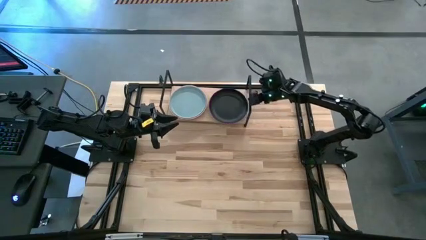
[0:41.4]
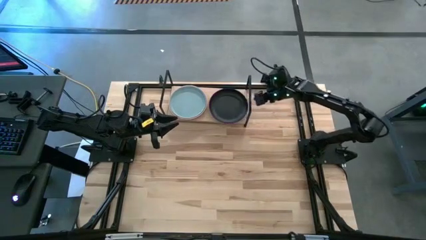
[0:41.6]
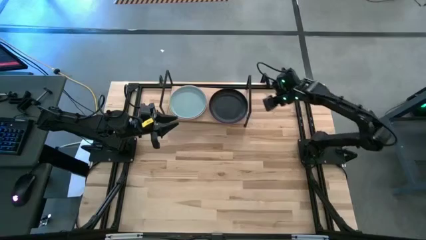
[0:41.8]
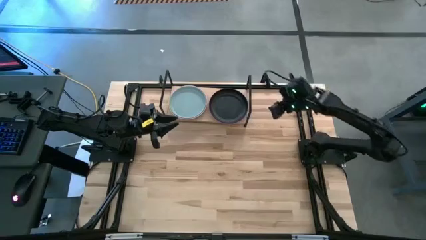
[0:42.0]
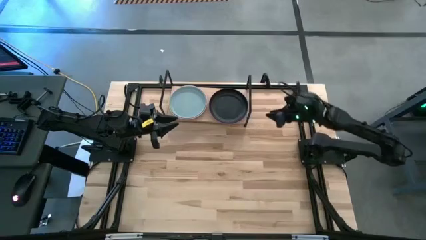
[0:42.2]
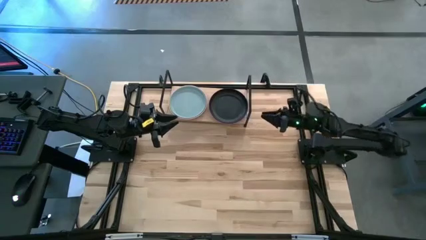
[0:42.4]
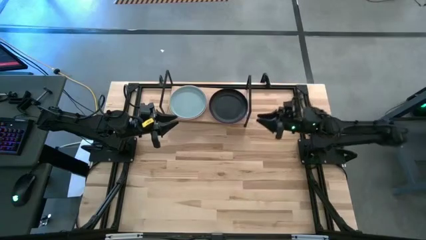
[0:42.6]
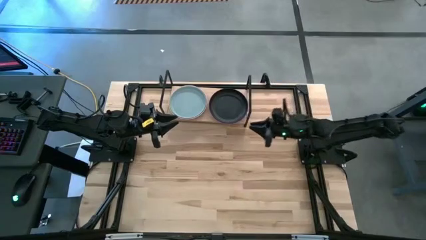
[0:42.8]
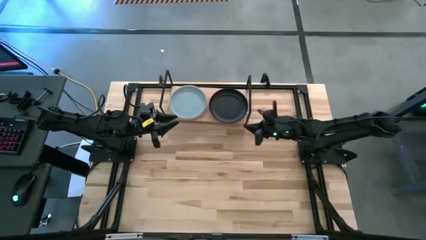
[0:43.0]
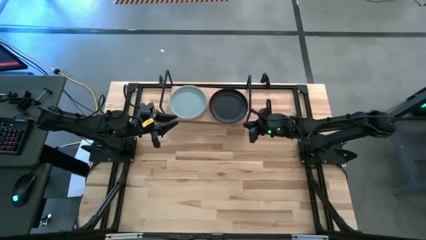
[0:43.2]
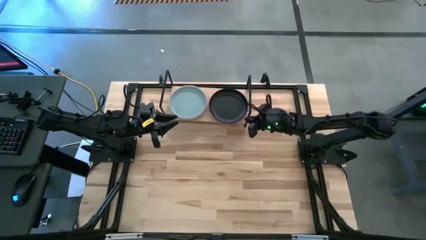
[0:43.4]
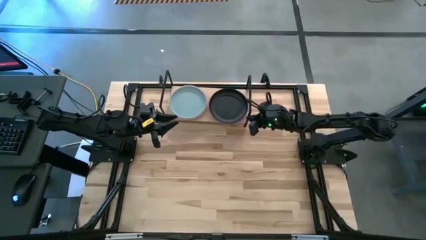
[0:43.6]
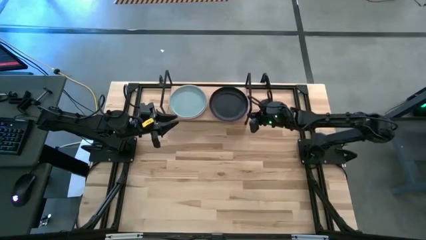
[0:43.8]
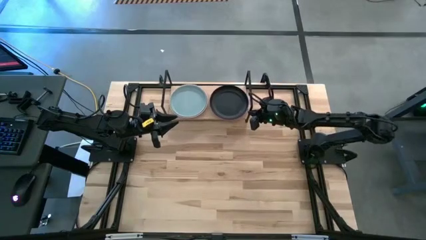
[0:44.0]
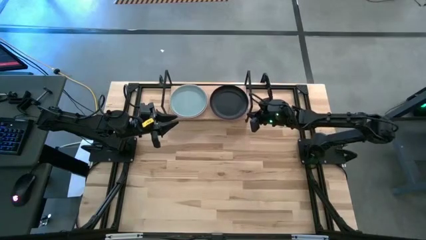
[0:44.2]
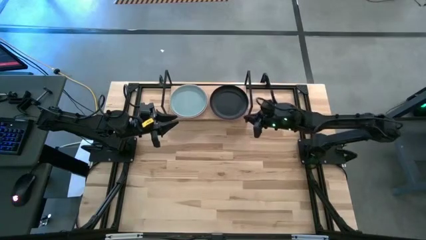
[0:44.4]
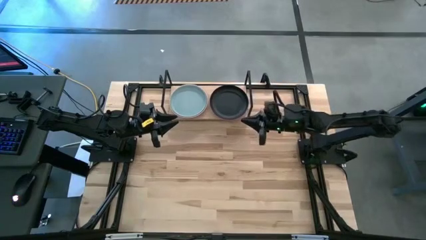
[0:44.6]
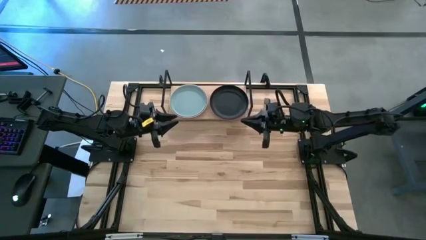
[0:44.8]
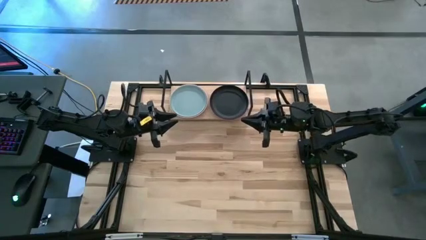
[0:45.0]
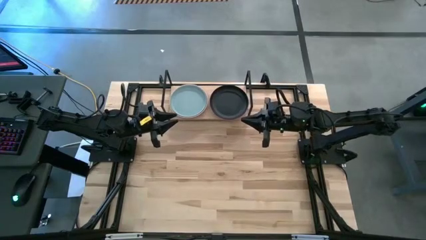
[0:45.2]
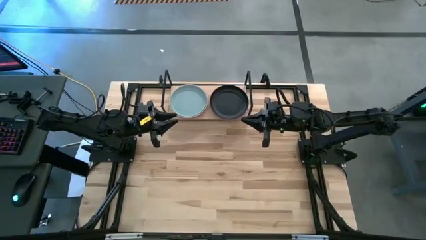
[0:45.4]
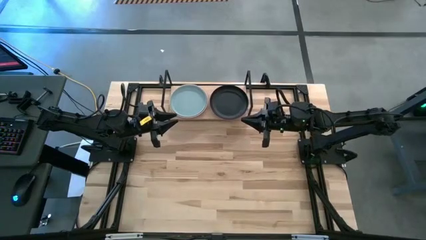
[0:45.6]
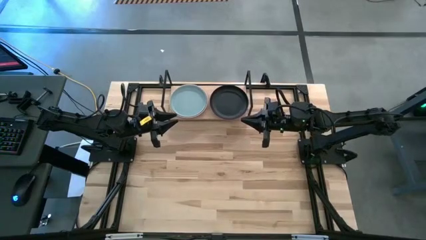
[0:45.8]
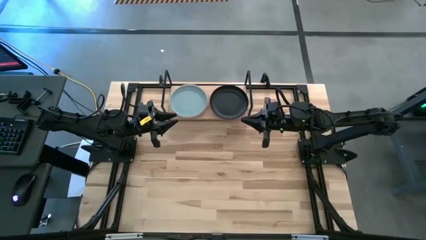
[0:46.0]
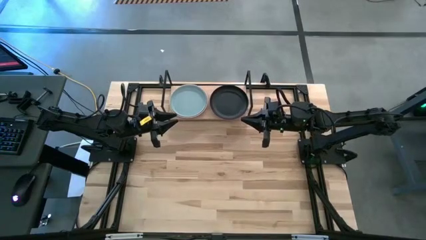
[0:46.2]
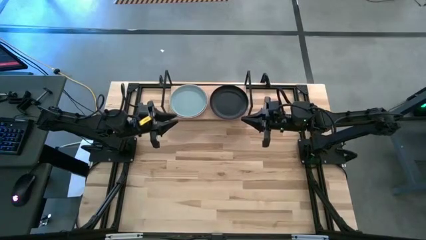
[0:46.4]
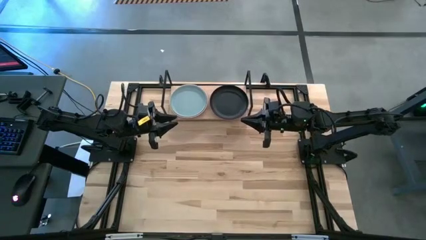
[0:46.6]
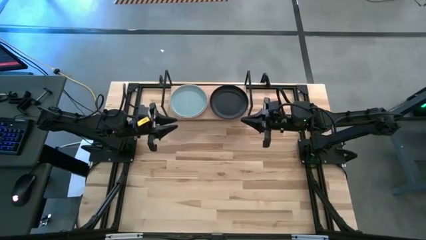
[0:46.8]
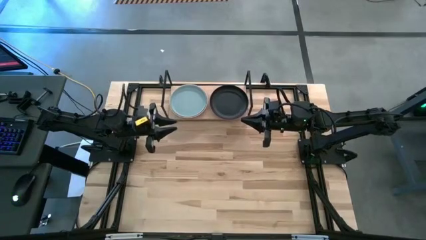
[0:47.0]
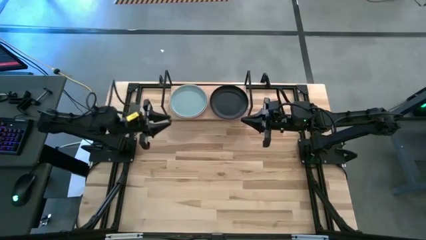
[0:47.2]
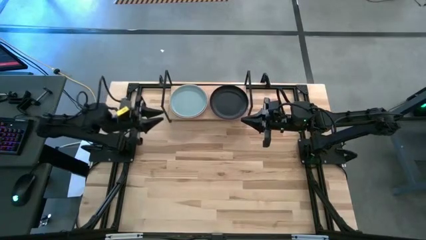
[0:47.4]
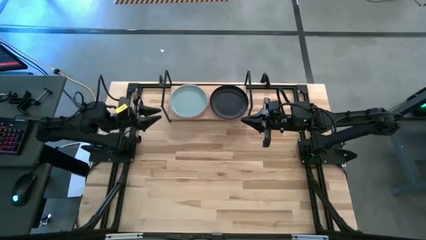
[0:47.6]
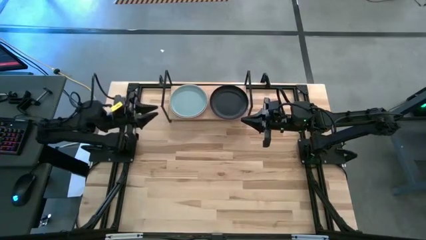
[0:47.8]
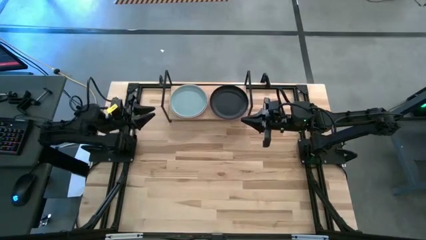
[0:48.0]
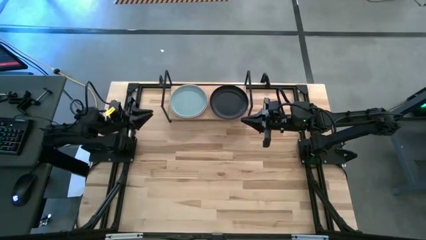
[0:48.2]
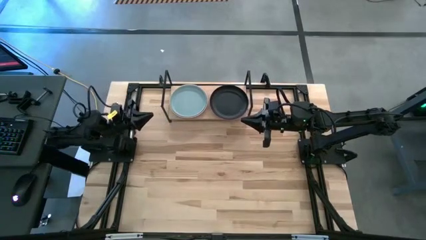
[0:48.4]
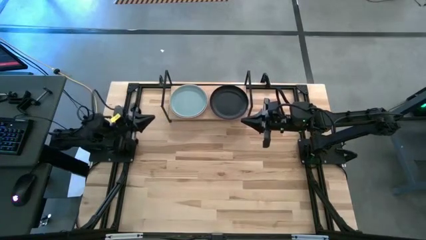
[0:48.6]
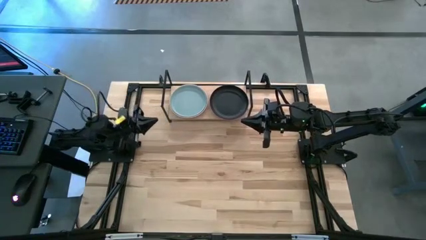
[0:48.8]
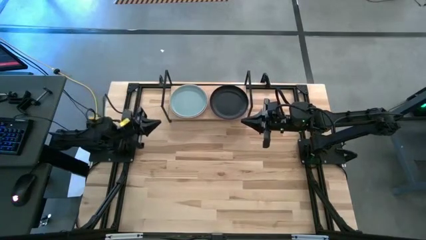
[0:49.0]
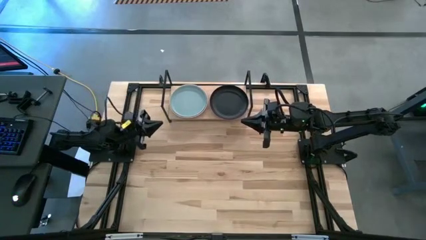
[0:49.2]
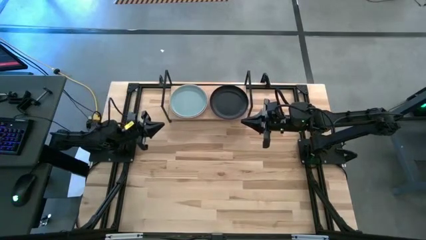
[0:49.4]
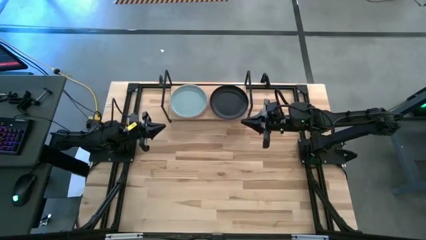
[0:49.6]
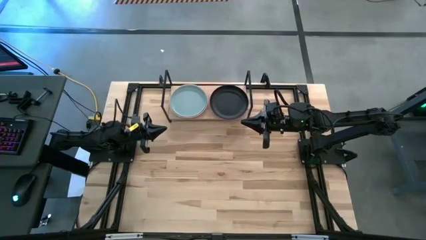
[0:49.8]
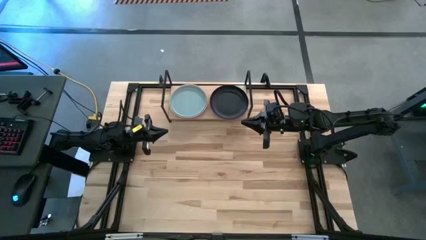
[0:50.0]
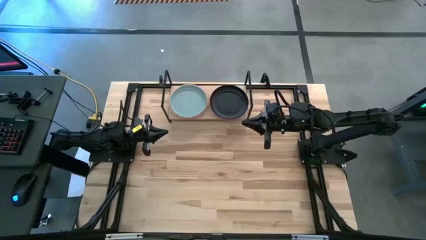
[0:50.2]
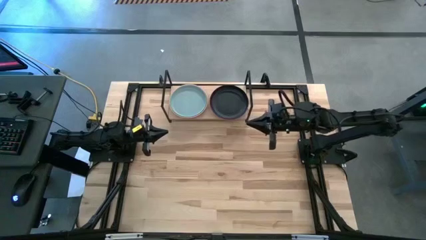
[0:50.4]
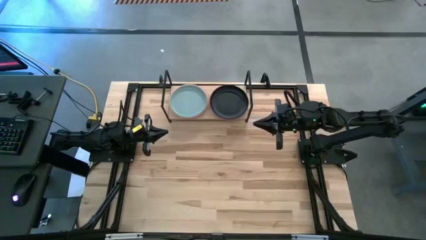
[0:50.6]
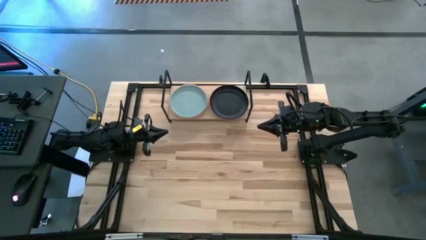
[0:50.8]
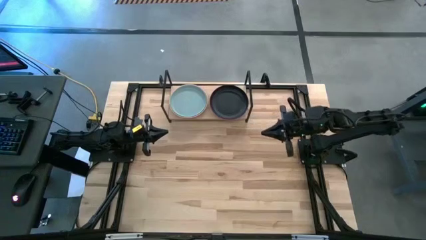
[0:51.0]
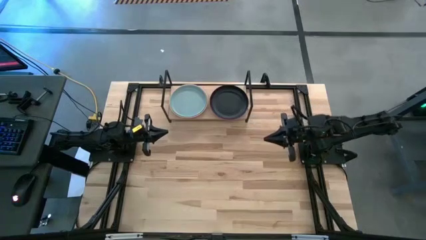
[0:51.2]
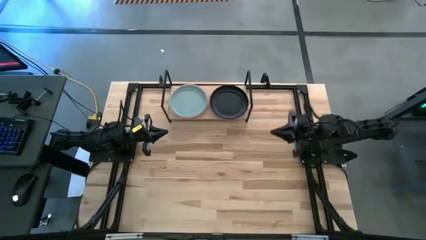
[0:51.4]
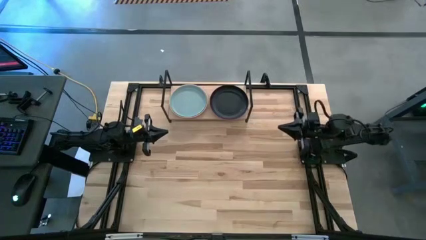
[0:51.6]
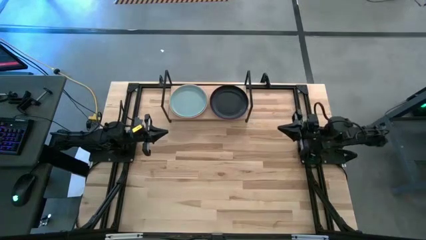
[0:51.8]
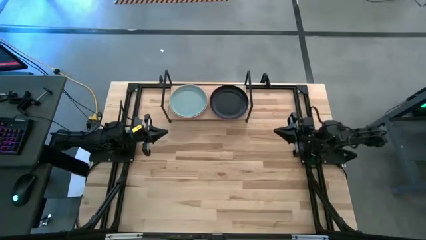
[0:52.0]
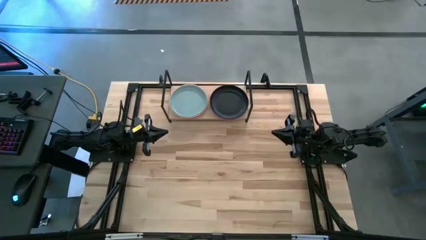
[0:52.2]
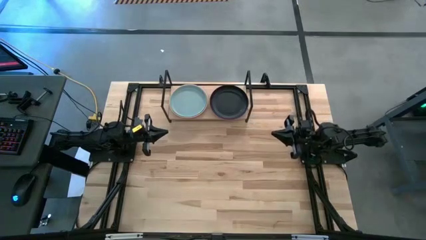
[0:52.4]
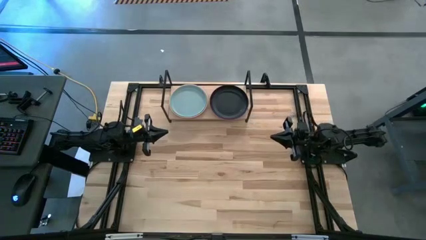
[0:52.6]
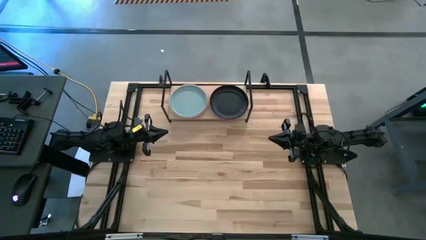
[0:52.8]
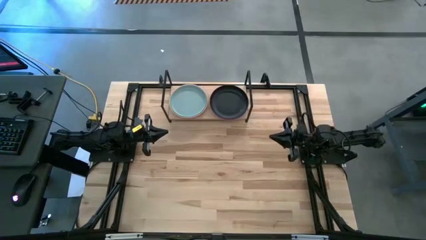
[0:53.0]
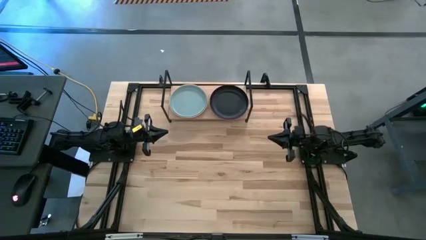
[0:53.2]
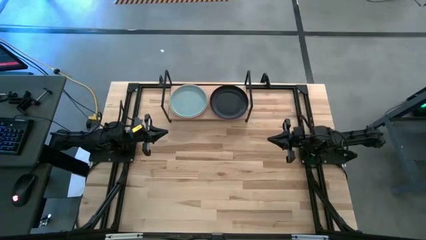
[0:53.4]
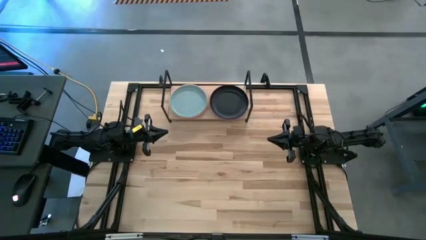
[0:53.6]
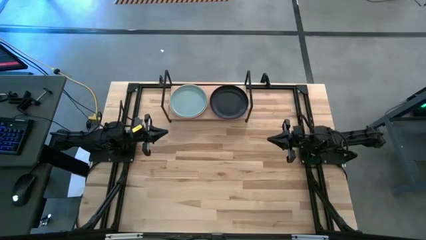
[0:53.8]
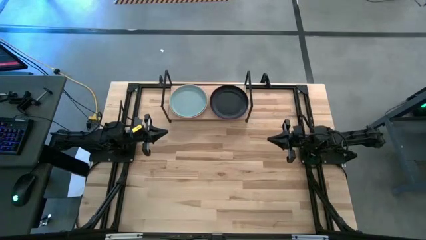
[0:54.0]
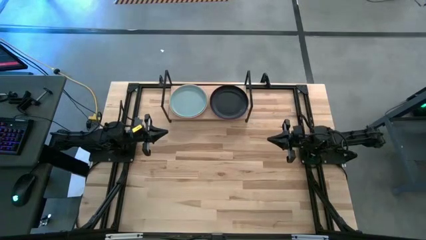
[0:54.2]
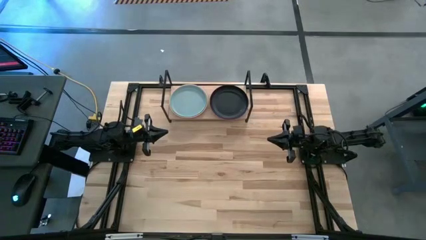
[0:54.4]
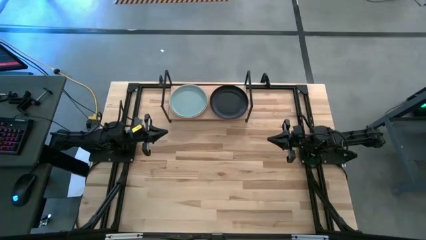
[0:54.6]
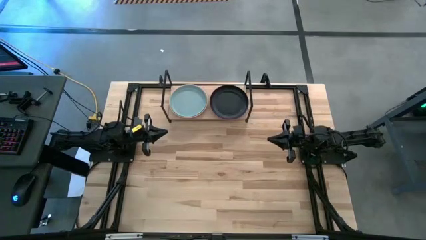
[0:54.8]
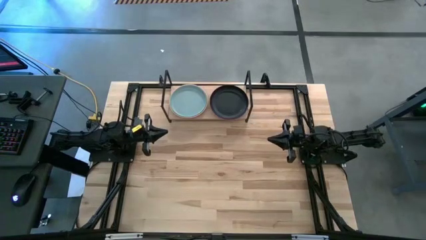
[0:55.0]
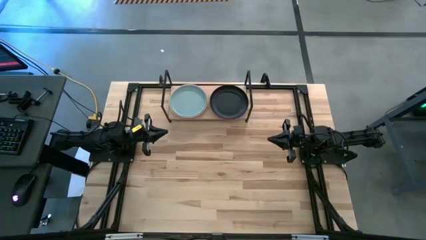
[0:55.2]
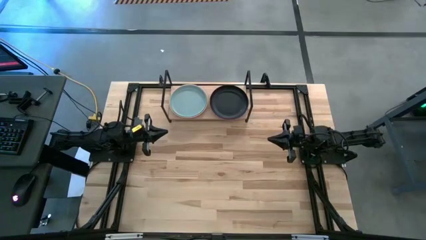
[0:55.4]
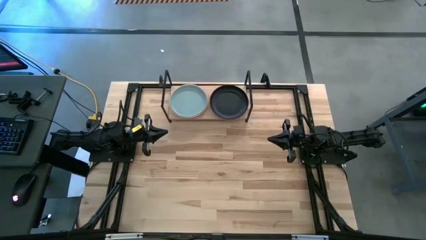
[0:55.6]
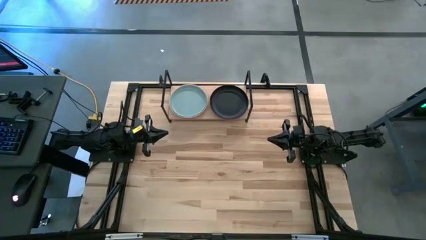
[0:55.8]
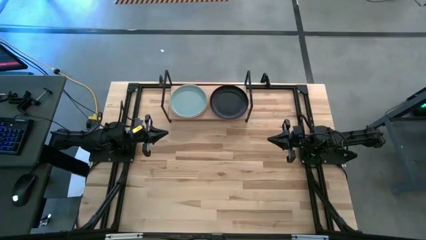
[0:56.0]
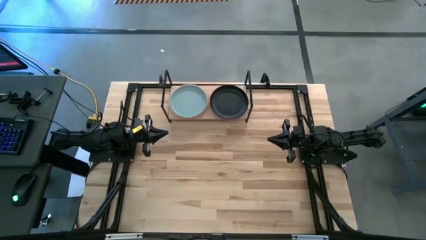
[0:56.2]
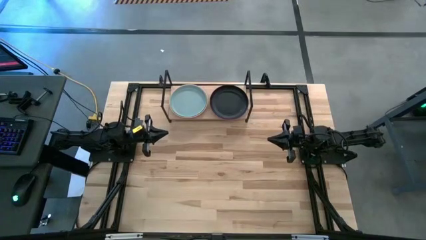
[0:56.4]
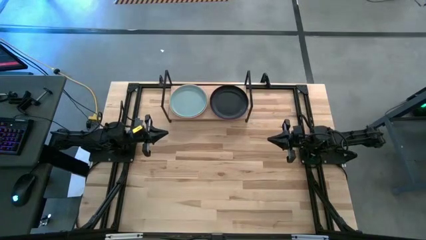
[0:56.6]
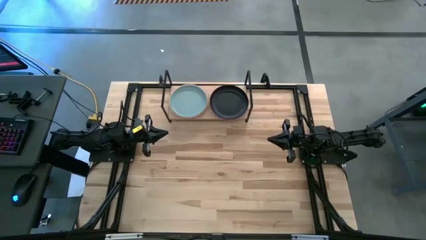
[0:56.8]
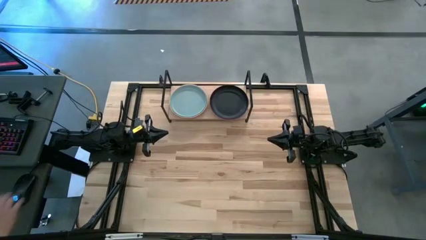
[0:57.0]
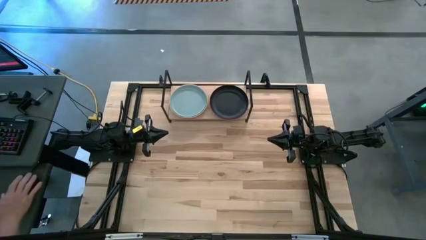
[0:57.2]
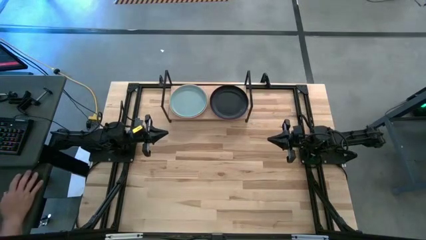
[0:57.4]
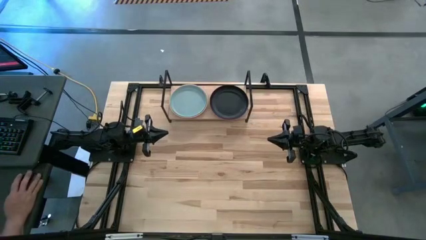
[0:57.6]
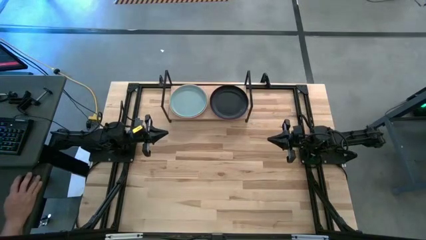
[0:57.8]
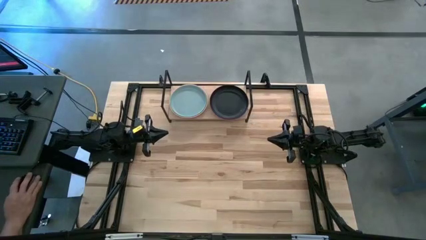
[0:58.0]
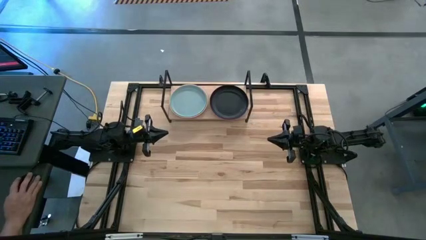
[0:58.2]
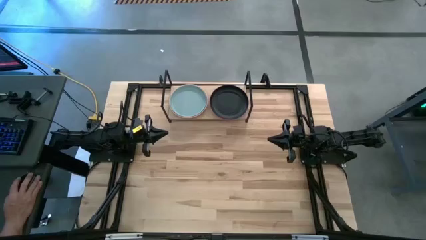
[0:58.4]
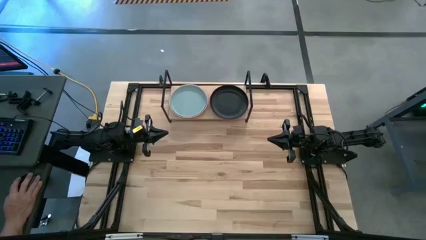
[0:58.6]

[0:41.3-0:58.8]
Task: Place and stack plates onto a shelf
Return to Home Position
